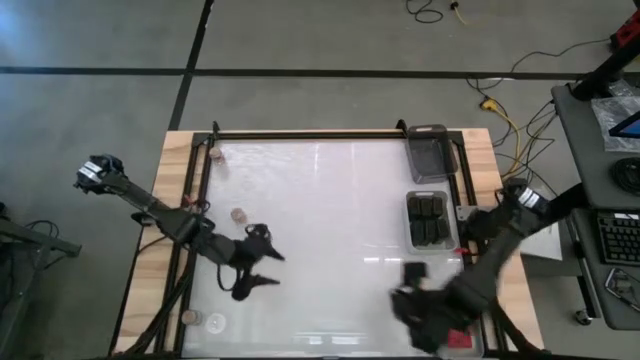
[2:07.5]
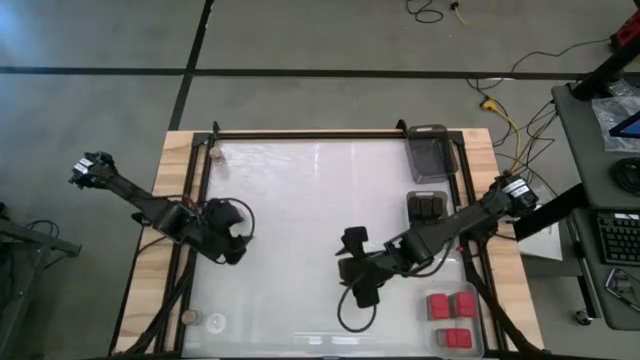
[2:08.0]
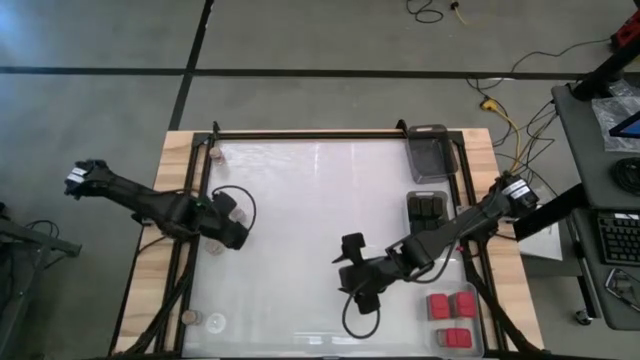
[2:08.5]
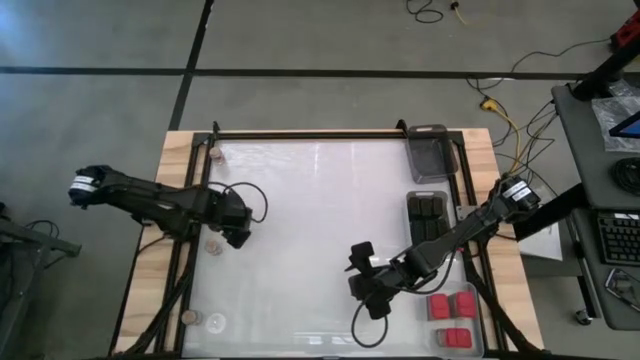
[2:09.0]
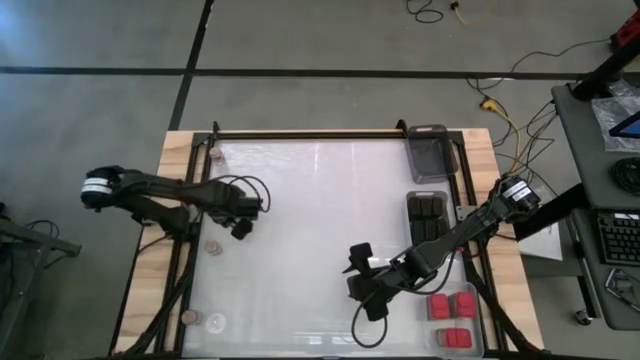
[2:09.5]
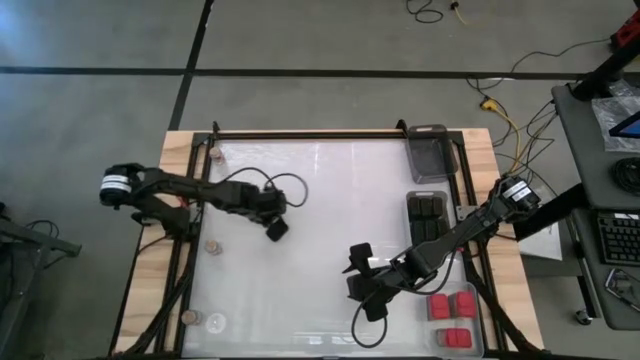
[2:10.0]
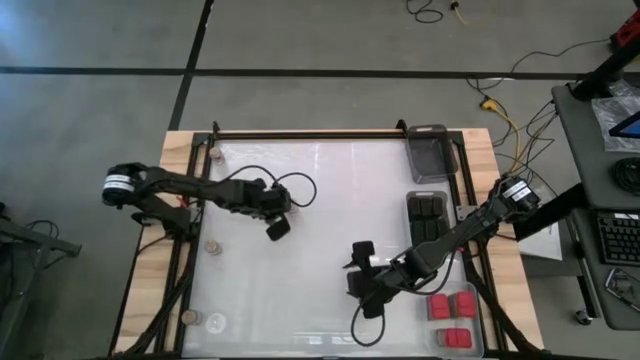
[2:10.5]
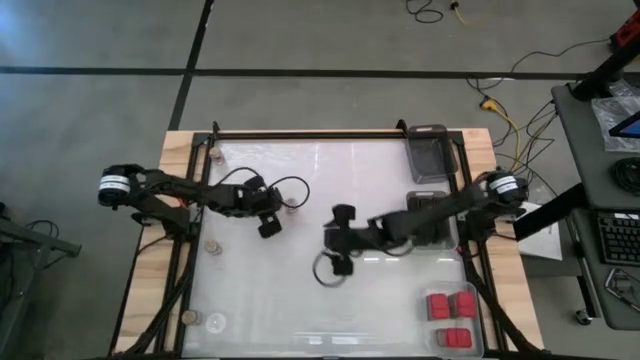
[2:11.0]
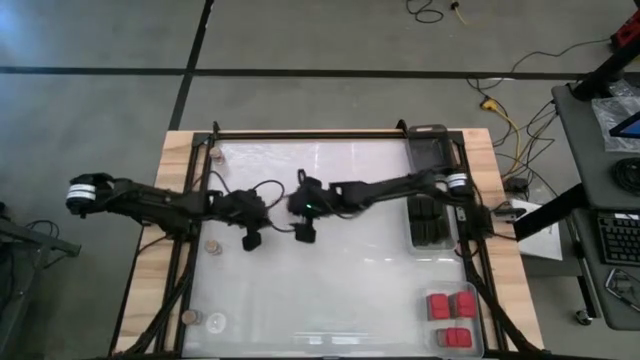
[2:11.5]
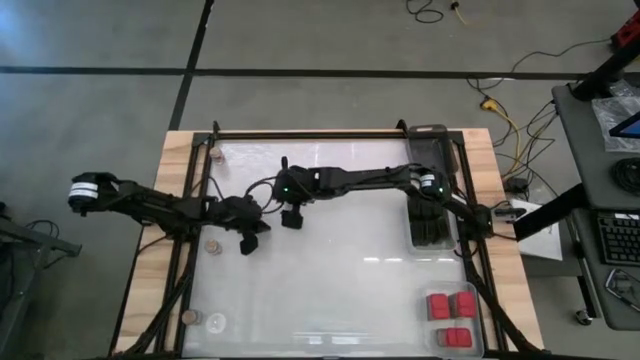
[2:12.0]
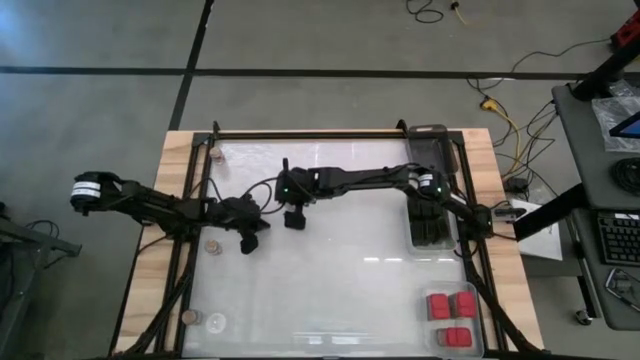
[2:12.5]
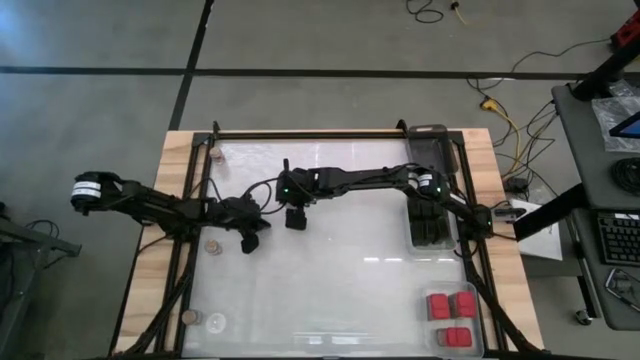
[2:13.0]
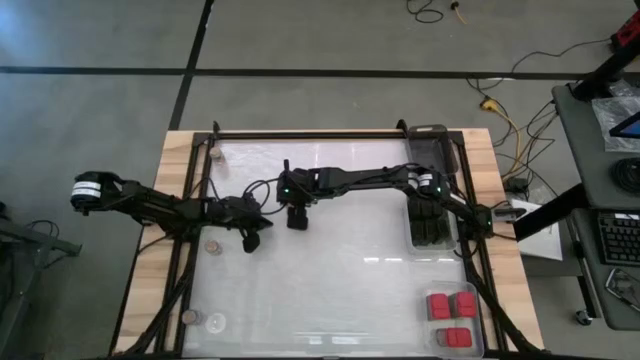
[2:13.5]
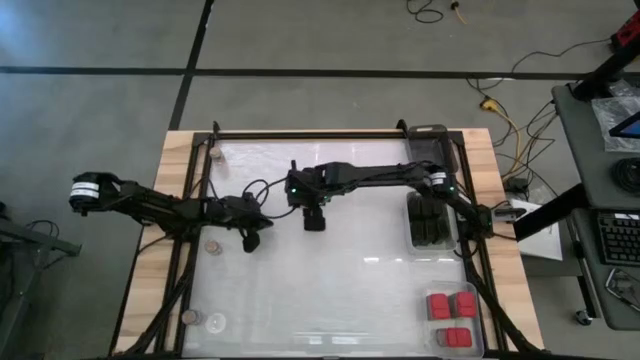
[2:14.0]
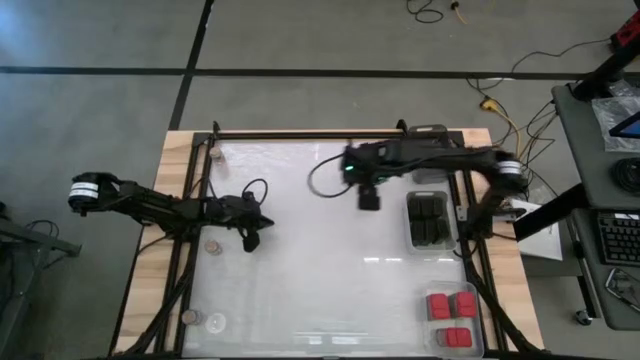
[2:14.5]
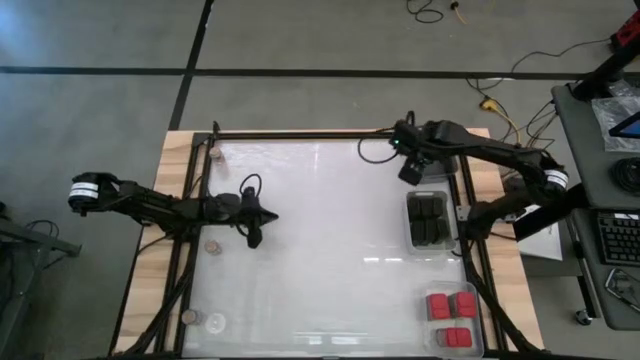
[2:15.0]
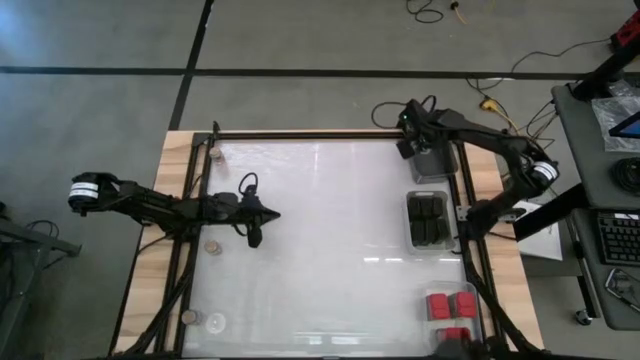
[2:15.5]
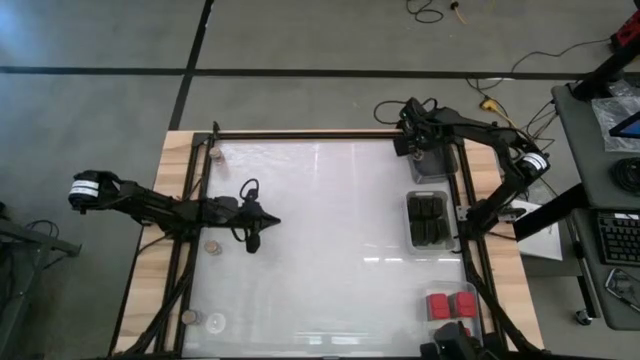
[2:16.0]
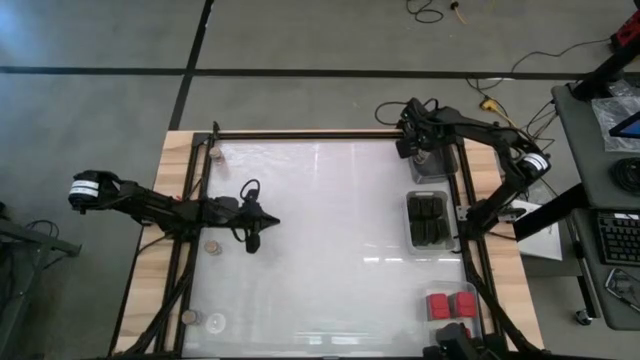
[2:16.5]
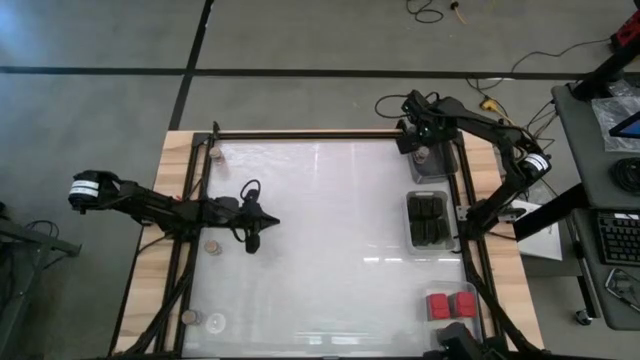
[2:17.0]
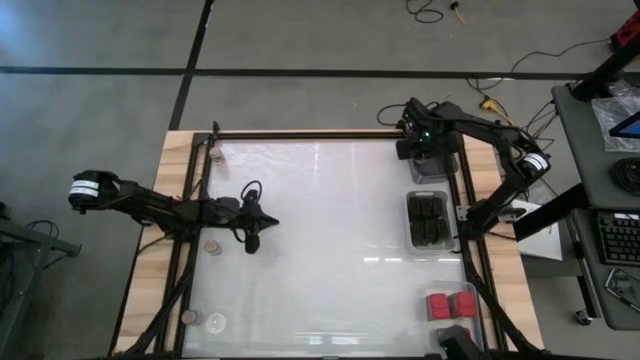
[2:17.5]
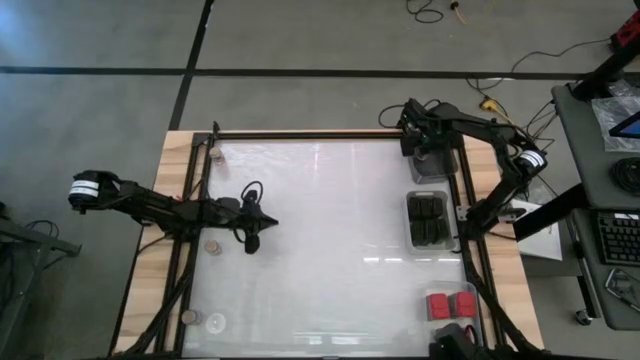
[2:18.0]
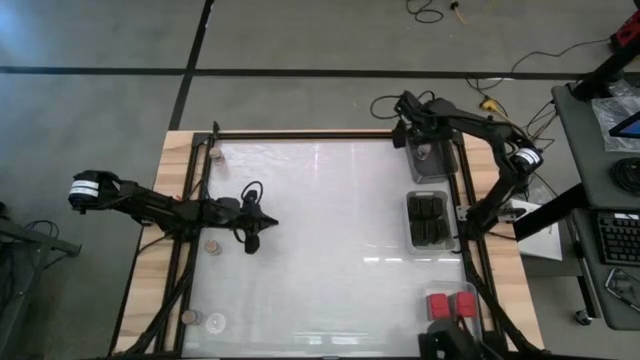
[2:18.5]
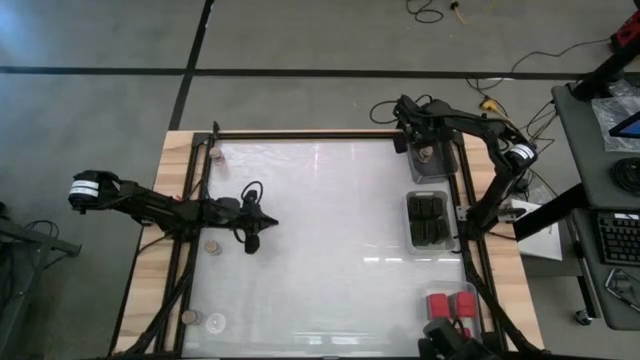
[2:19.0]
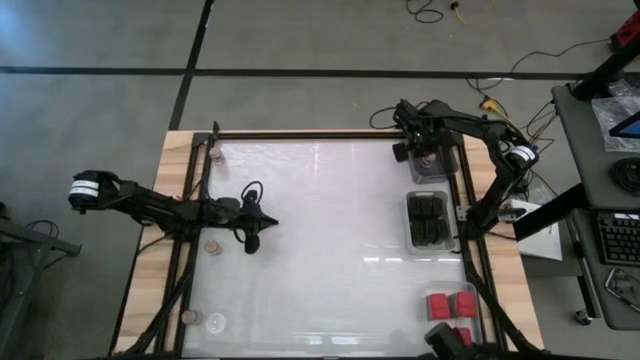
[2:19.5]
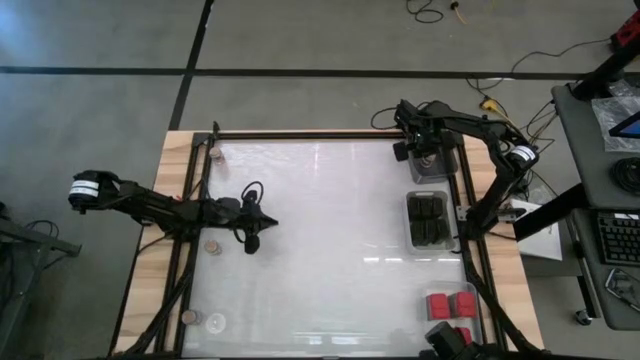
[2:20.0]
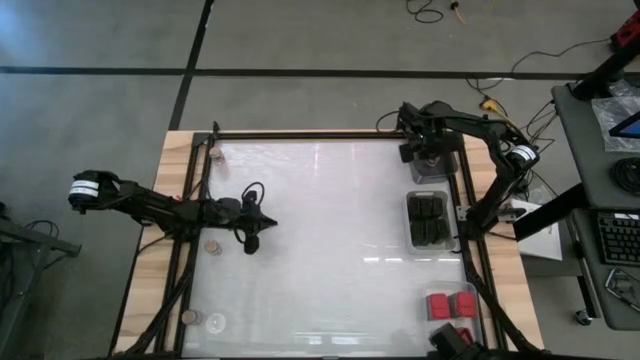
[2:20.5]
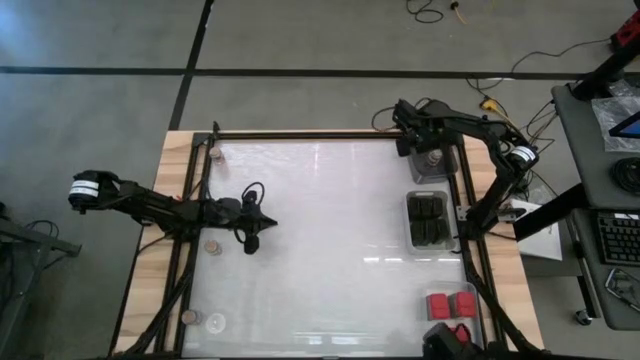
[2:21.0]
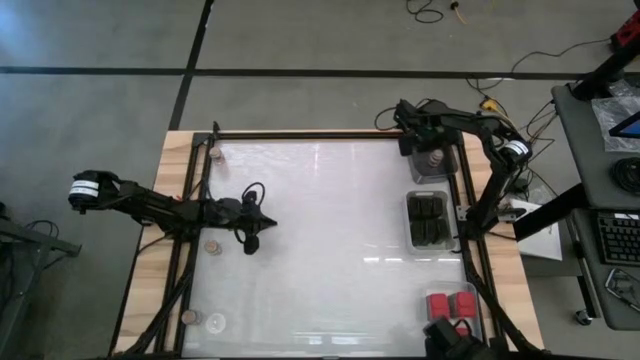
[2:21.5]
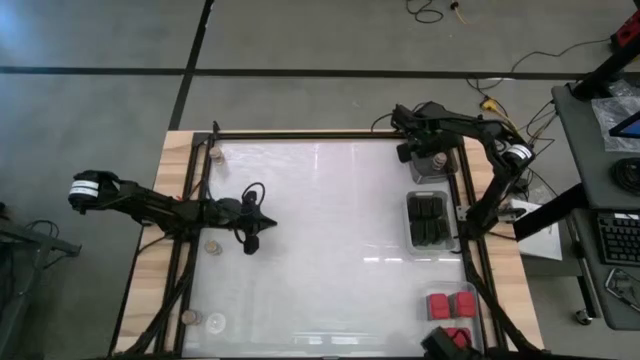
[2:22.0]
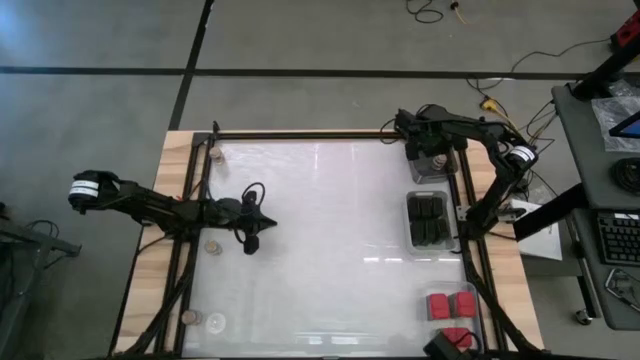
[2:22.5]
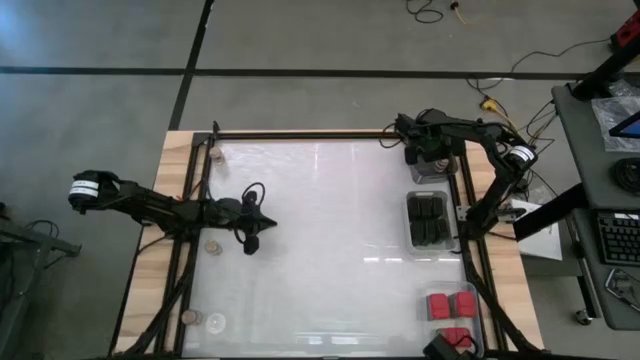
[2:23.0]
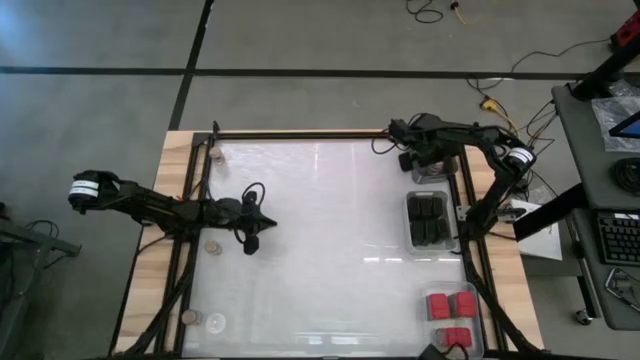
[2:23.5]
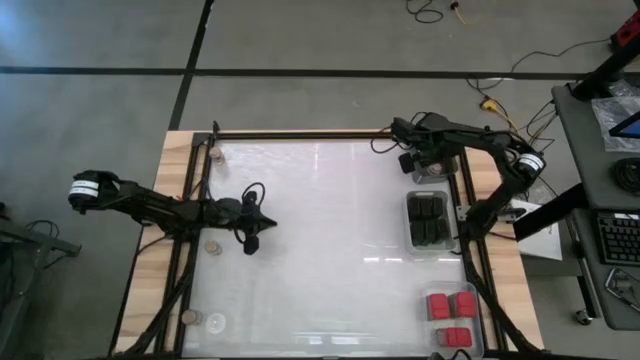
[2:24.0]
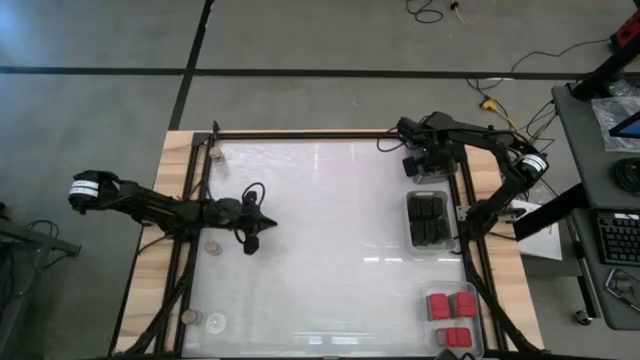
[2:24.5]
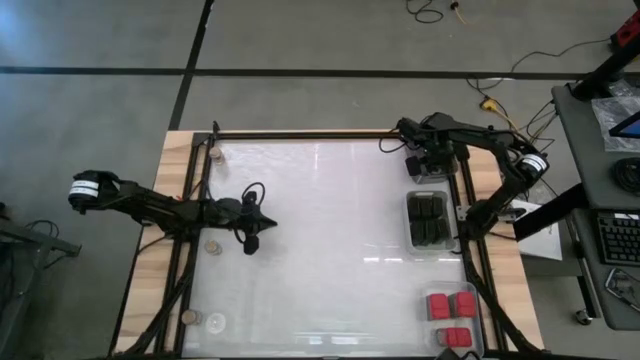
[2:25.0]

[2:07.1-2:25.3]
Task: Sort spices by type
Put the brown seasoning bottle into the black bin

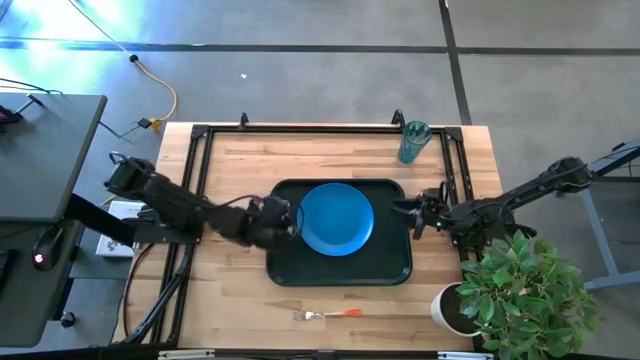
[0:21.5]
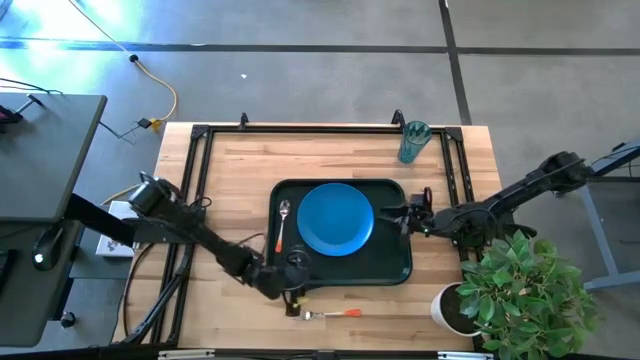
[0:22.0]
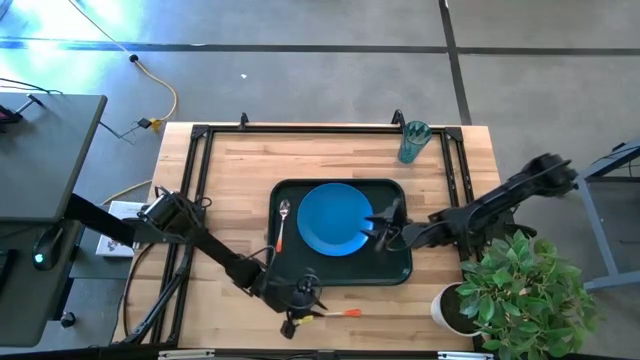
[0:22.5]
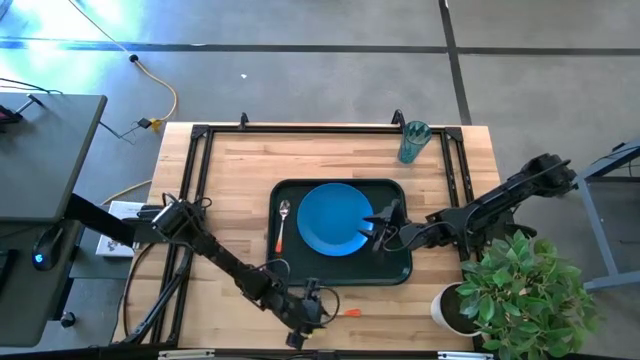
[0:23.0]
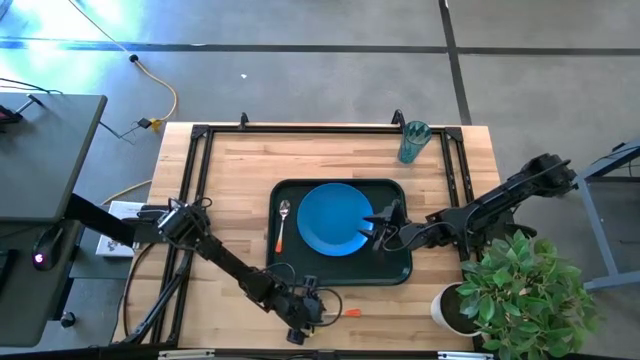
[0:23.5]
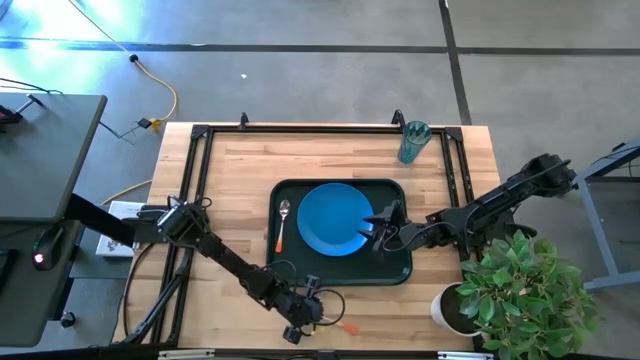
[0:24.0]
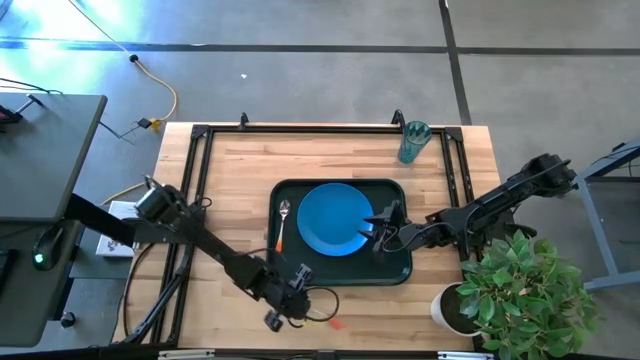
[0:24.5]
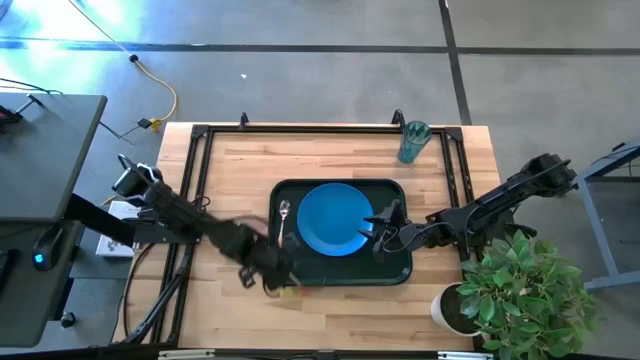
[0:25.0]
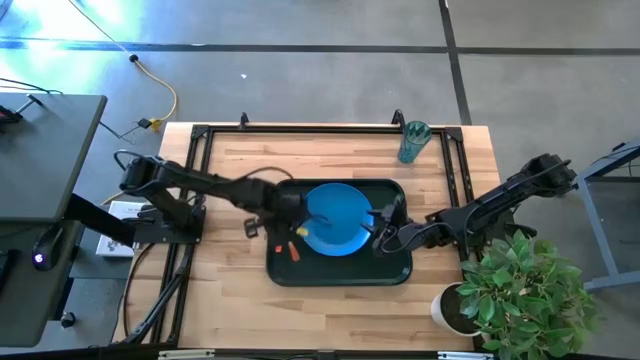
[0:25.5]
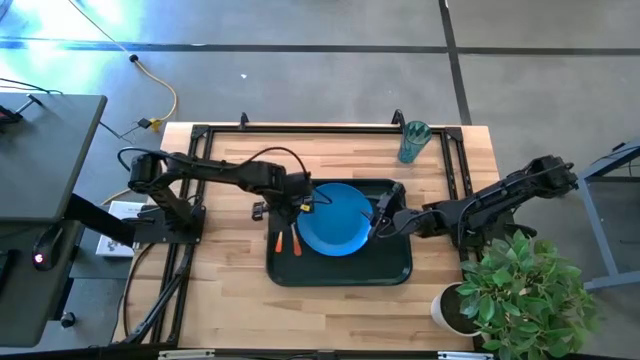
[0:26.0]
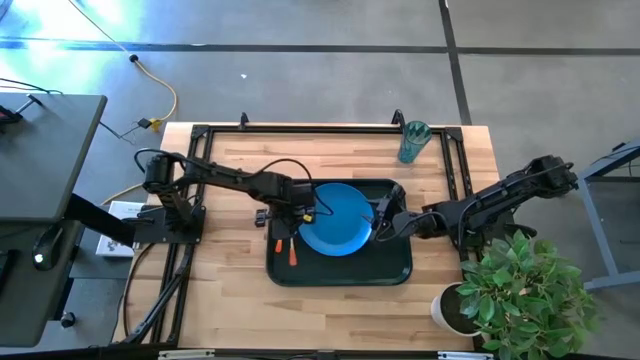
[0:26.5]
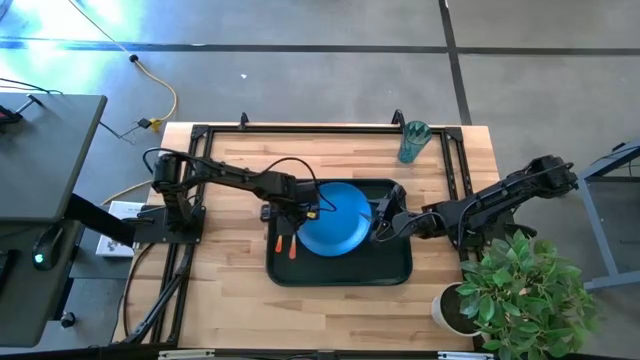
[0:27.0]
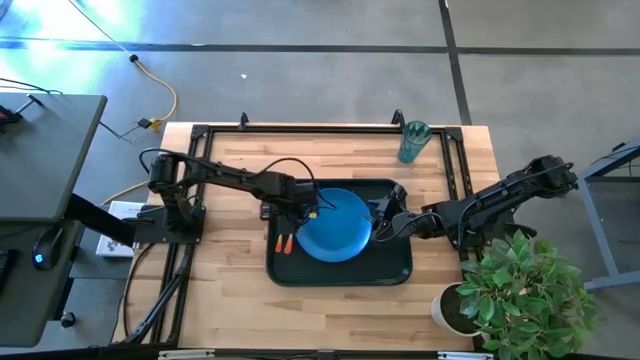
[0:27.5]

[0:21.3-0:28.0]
Task: Pick and place plate/cup/fork/spoon on tray
Put the orange fork to the right of the orange spoon on the black tray
